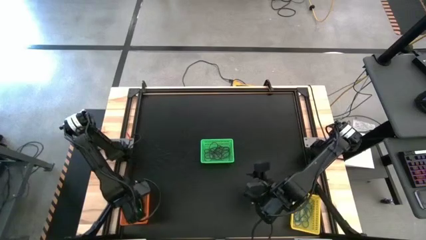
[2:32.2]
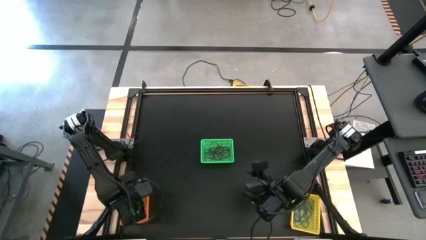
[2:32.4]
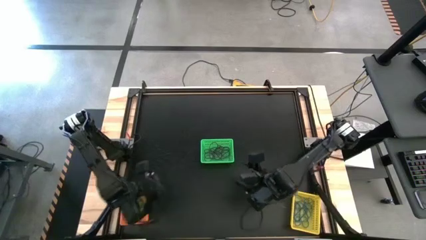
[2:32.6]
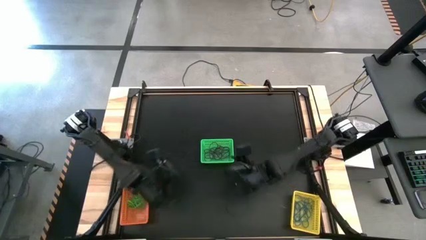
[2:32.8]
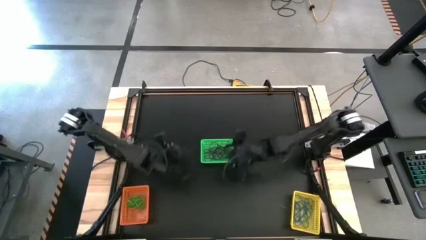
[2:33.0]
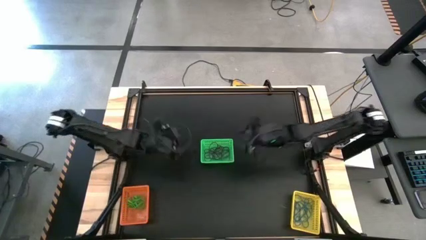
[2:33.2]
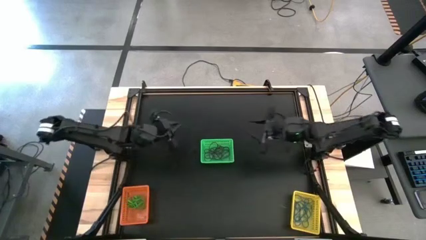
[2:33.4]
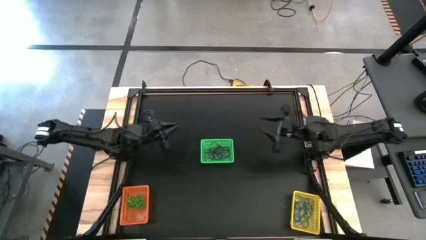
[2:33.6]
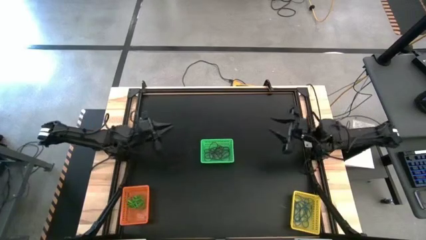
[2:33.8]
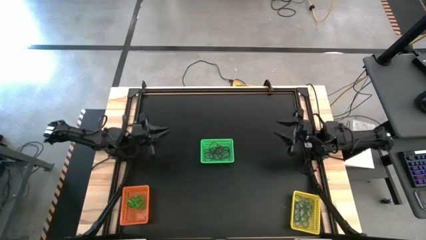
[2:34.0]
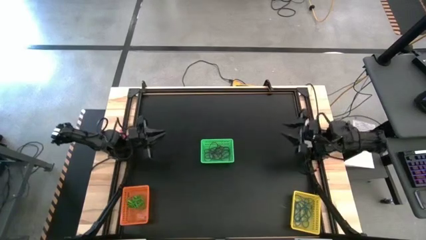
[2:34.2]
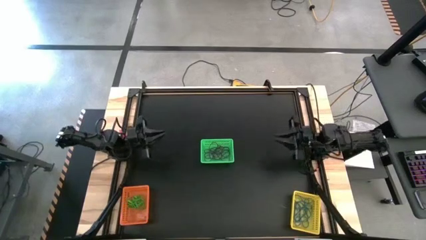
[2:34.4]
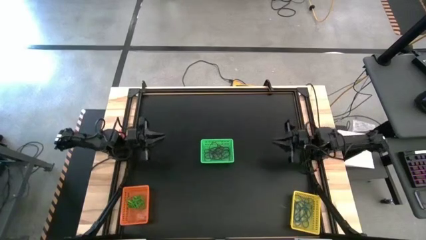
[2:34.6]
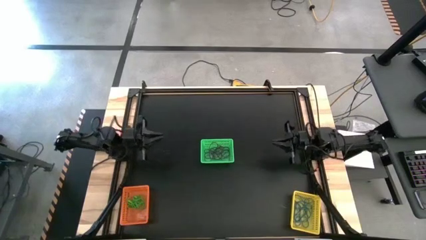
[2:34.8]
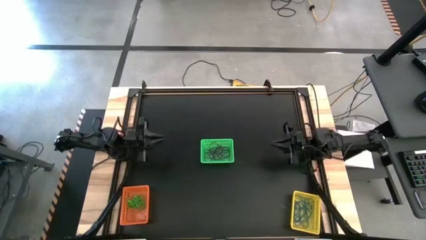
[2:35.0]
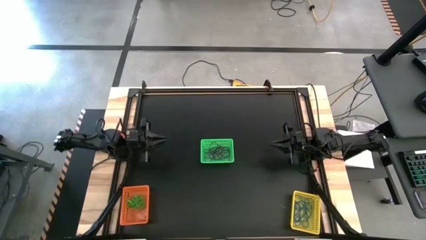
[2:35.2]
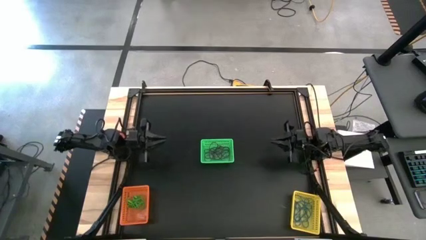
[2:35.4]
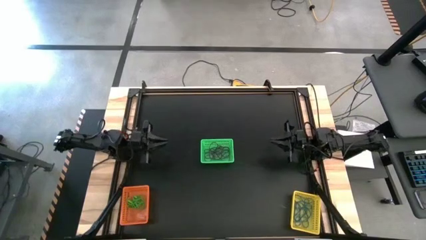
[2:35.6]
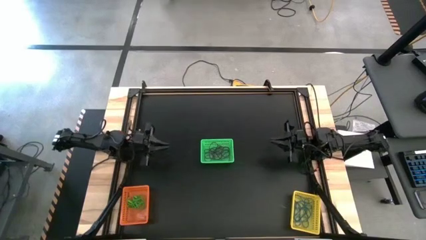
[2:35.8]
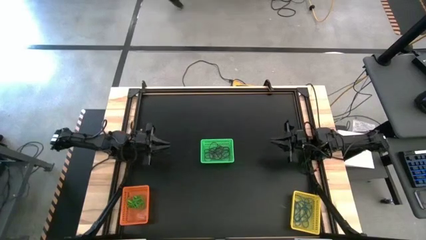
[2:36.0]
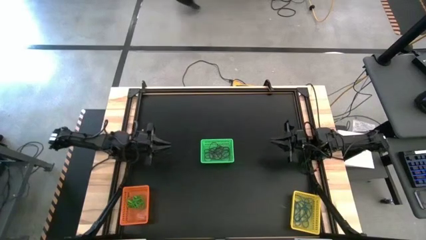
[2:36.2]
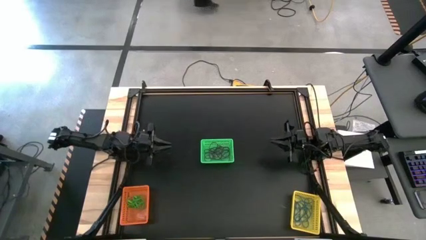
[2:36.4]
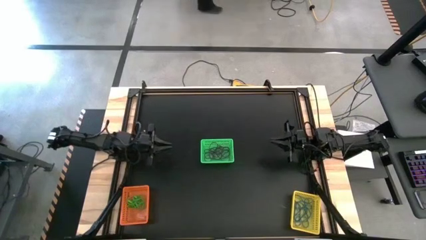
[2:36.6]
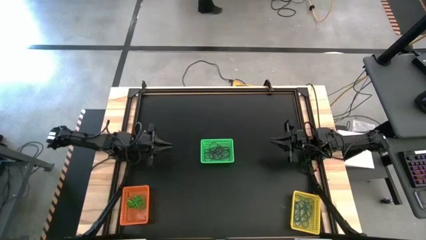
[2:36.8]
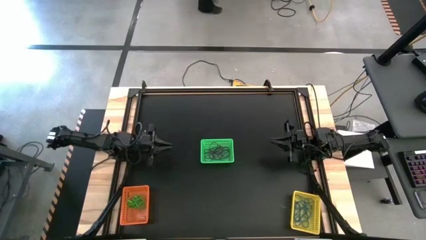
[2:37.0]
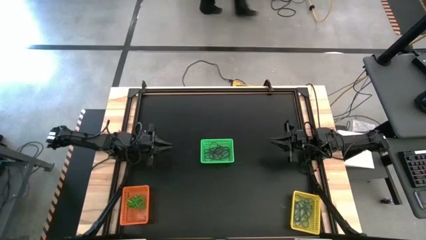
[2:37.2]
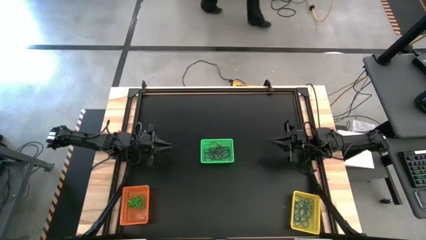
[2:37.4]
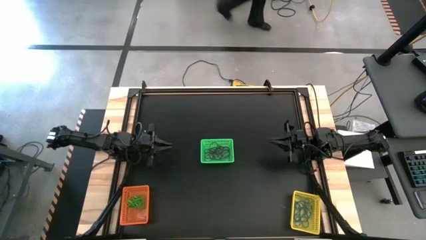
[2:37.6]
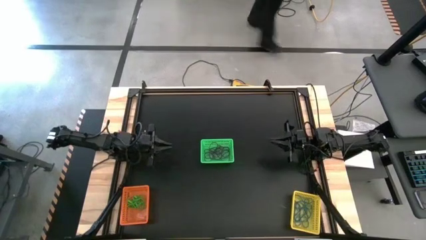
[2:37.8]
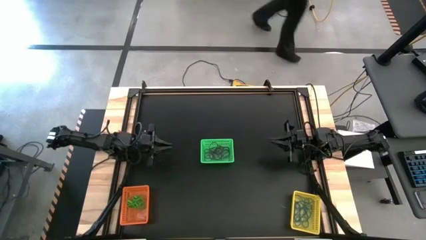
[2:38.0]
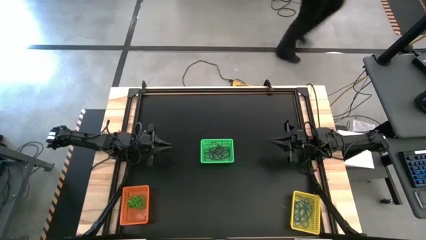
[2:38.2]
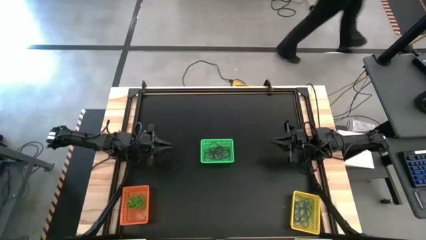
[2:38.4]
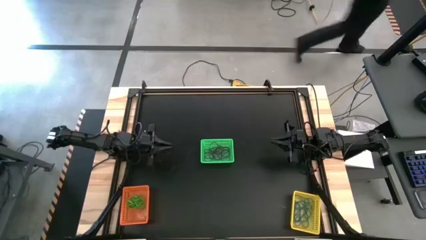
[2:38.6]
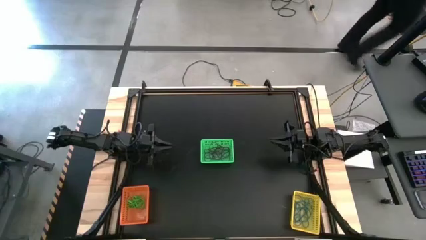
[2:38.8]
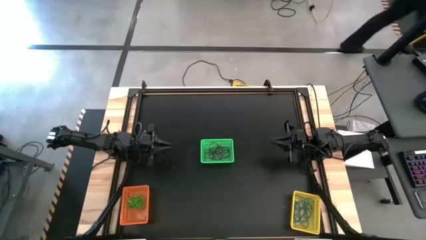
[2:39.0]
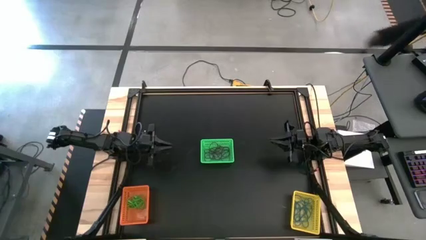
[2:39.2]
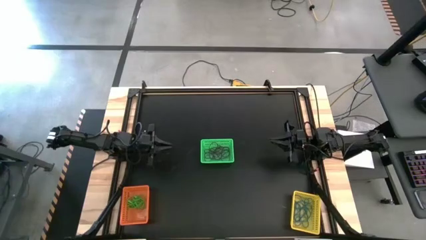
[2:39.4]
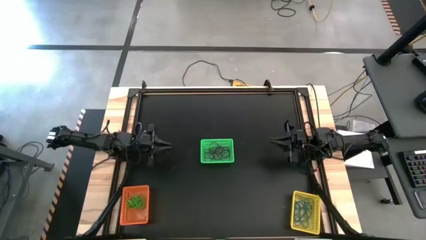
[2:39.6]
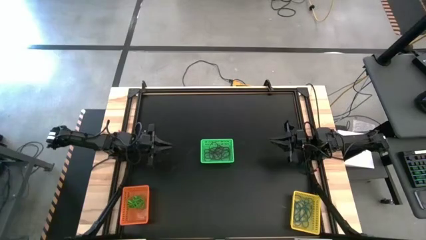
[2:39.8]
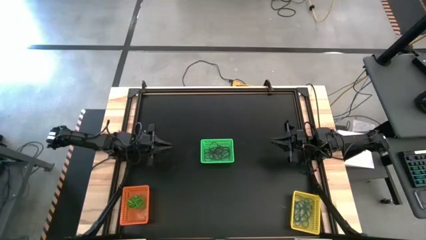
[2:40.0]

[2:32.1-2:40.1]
Task: Sort rubber bands into baskets
Return to Home Position

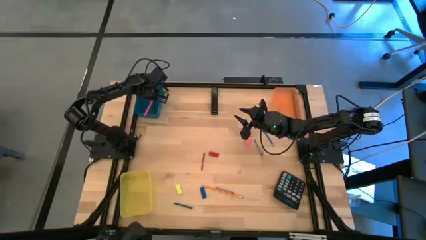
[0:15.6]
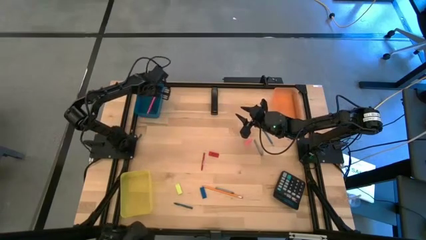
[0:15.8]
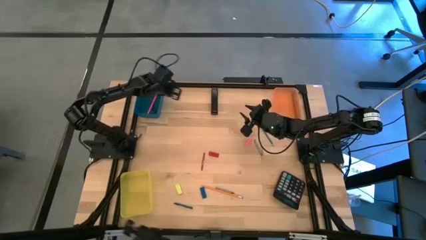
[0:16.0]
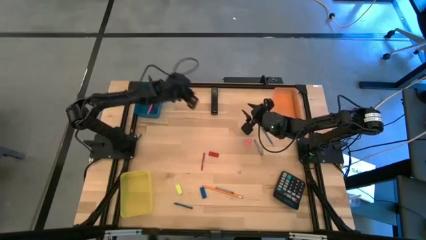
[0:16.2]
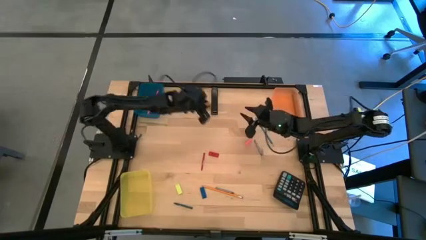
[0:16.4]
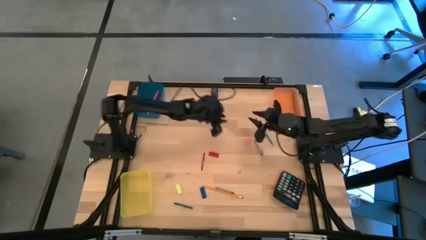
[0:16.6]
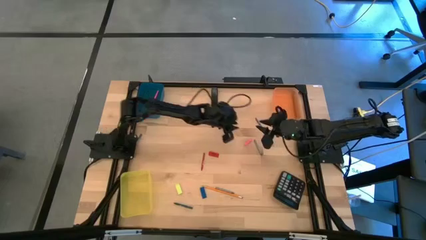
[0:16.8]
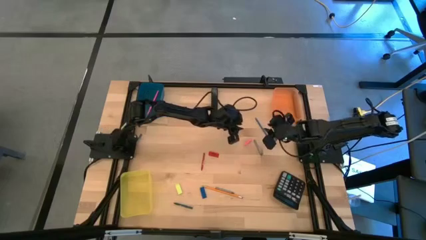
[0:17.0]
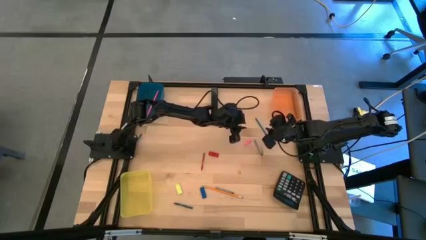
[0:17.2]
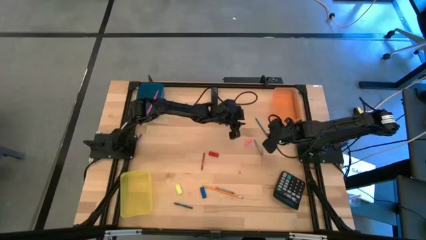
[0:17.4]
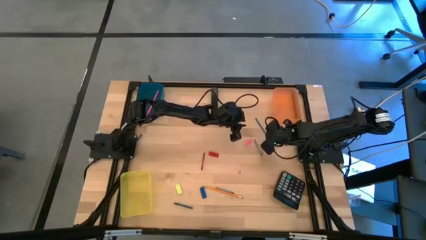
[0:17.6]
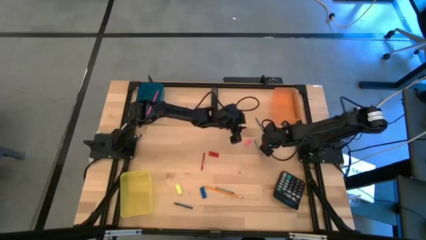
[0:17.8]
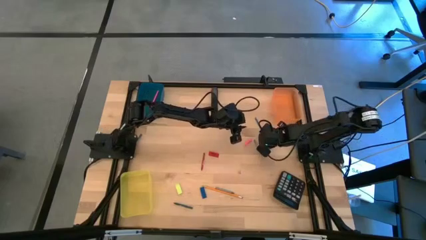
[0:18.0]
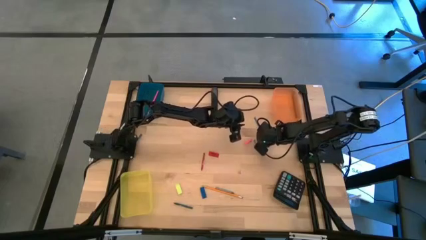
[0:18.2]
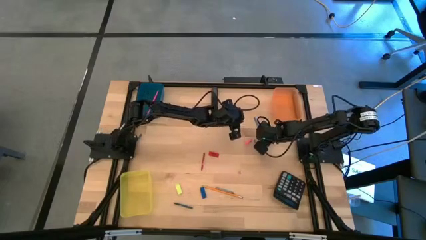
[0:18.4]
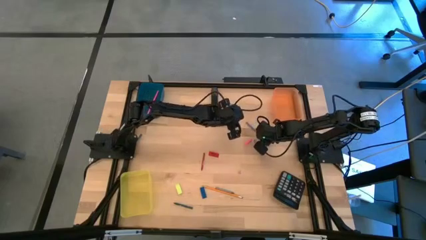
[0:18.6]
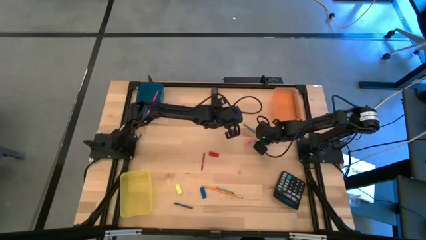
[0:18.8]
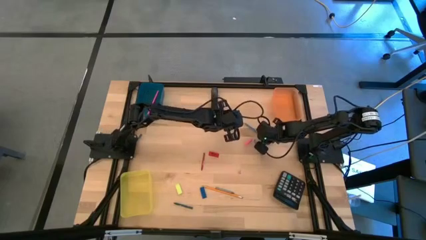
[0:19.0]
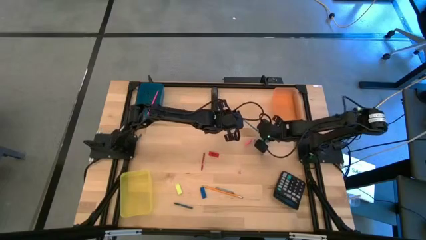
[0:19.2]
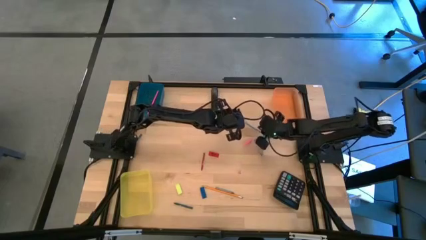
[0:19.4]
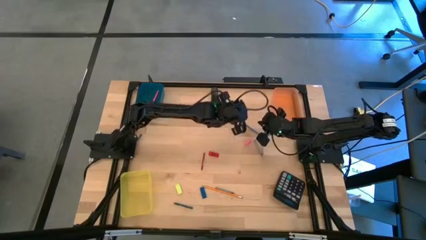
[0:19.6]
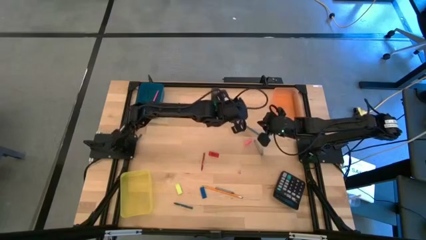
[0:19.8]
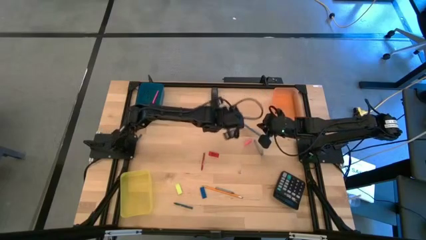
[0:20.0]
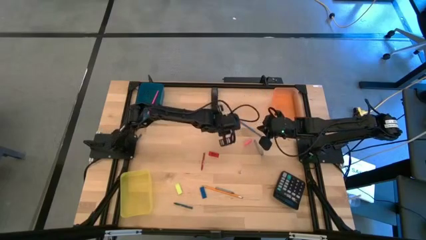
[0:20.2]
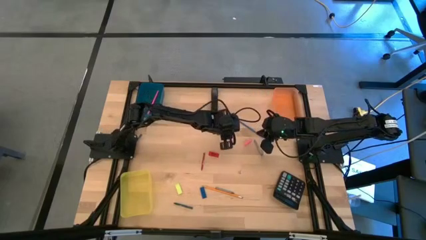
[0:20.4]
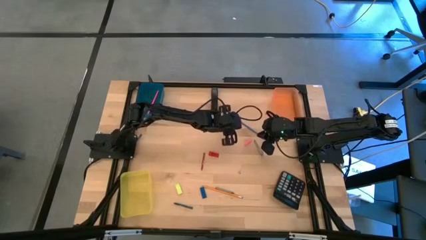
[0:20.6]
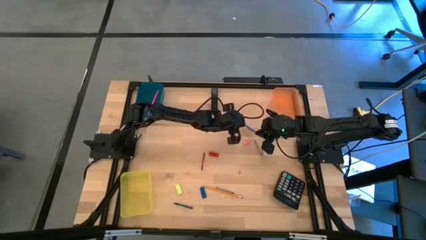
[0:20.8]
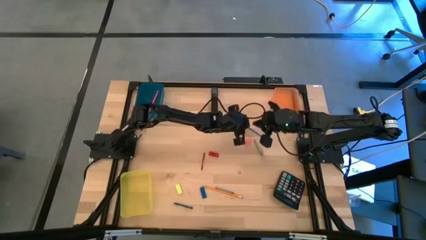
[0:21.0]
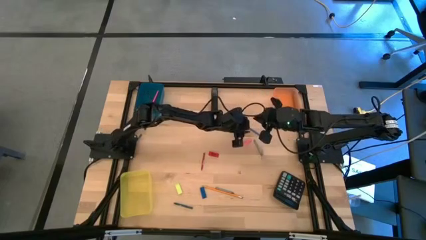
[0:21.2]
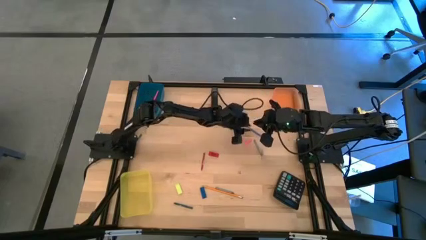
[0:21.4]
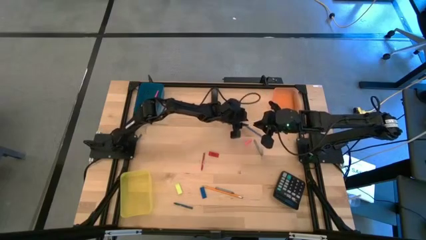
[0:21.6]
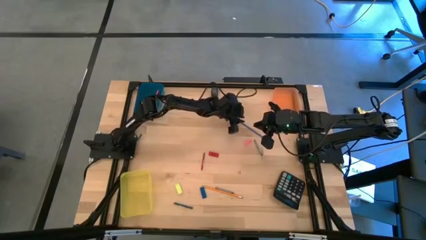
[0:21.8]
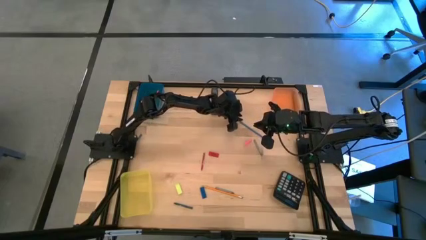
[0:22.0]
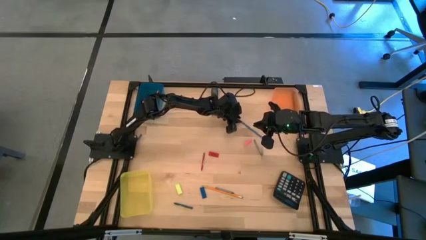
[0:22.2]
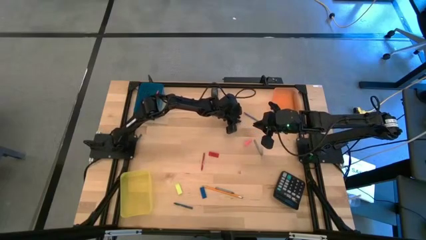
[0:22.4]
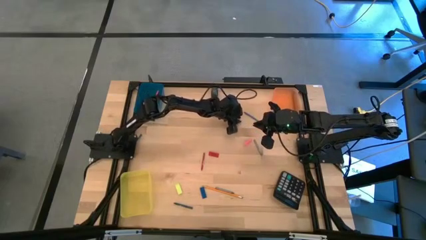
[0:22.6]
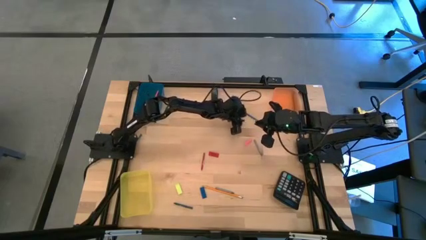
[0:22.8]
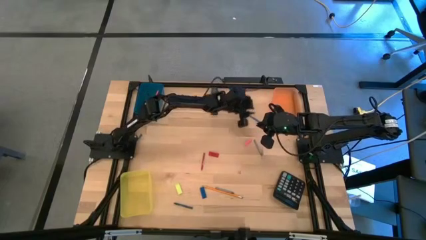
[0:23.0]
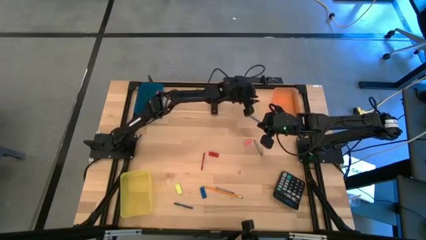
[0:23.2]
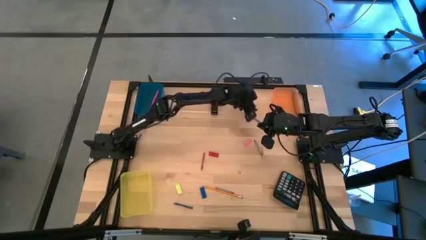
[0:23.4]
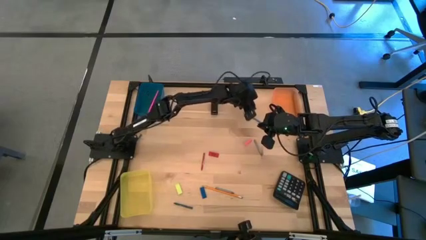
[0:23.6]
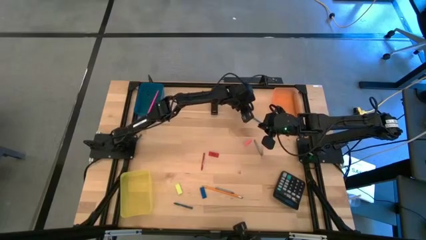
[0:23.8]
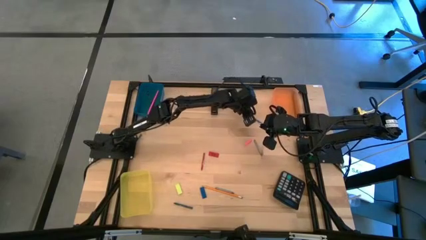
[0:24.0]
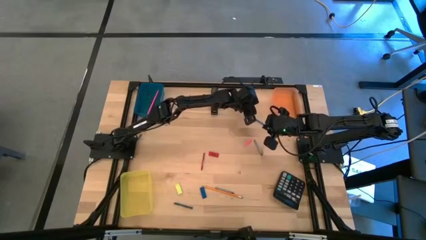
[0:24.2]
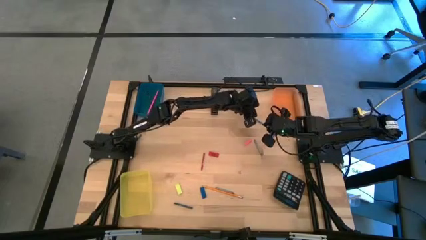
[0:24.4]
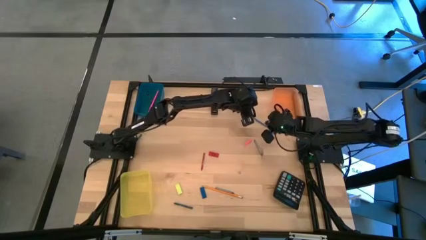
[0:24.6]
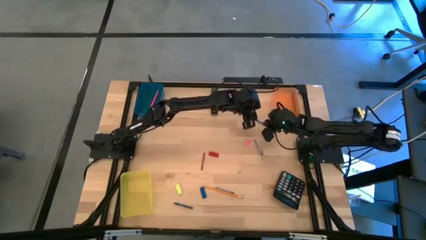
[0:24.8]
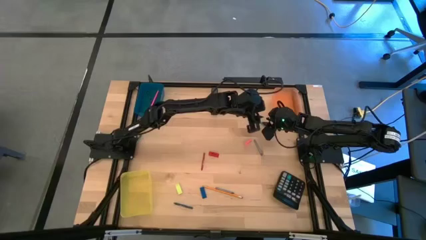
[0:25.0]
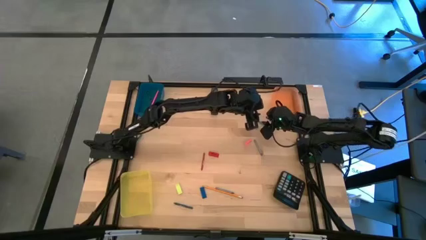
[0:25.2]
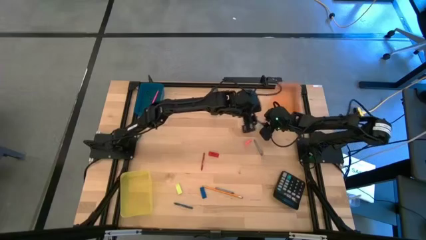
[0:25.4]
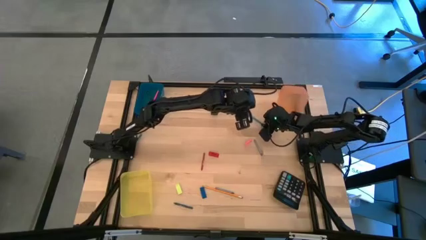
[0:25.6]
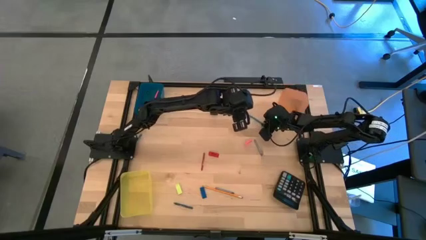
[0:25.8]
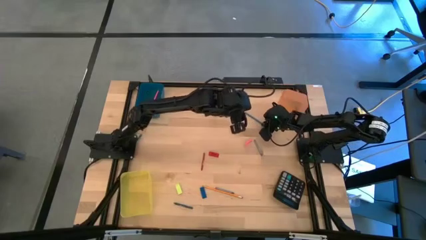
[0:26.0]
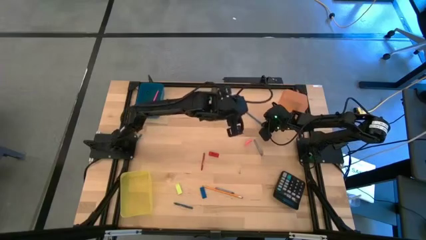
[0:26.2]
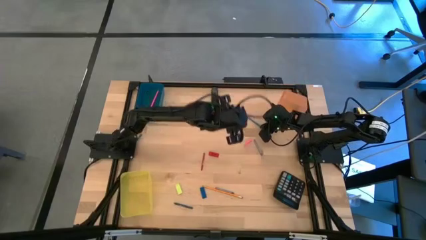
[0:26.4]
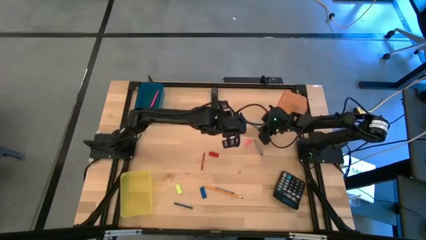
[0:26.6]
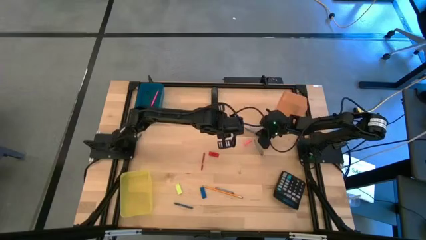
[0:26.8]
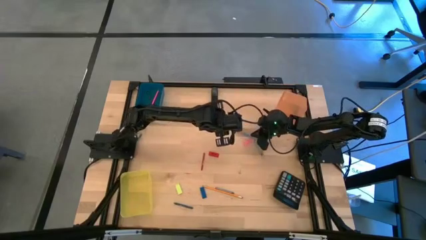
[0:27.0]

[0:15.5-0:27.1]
Task: Sort crayons/erasers/pens/pencils in bins
Put the blue pencil into the blue bin
